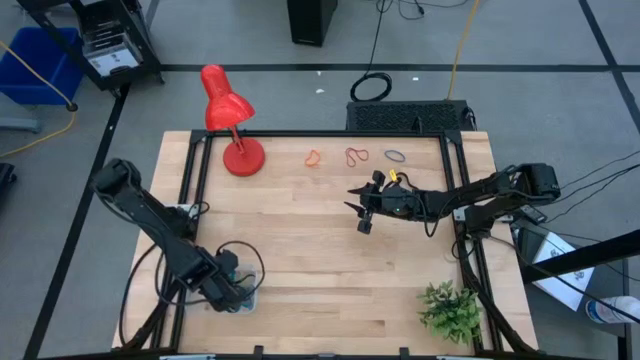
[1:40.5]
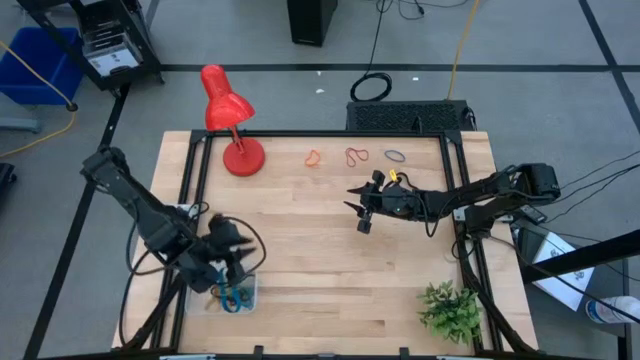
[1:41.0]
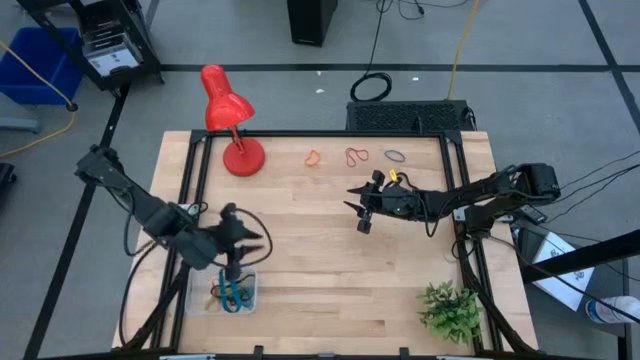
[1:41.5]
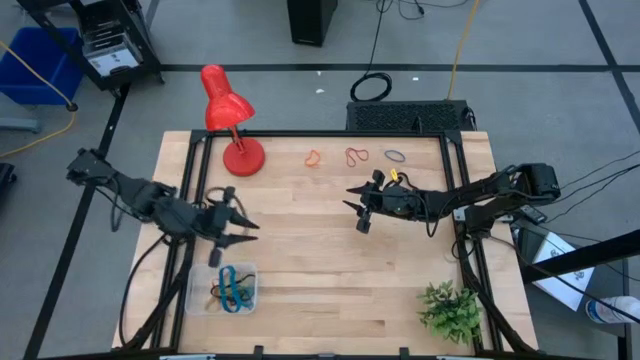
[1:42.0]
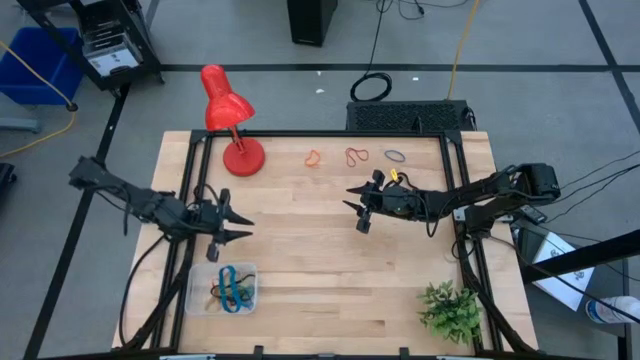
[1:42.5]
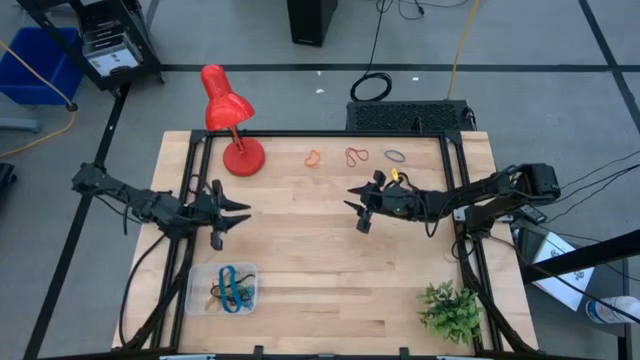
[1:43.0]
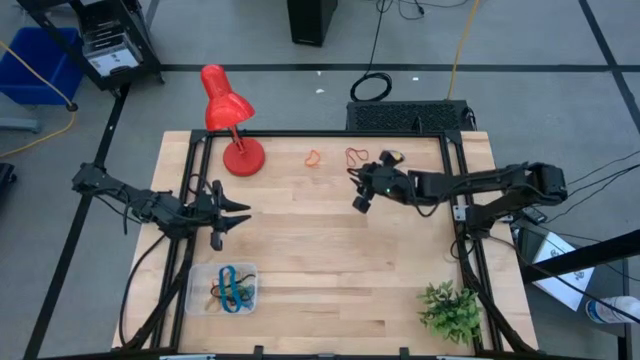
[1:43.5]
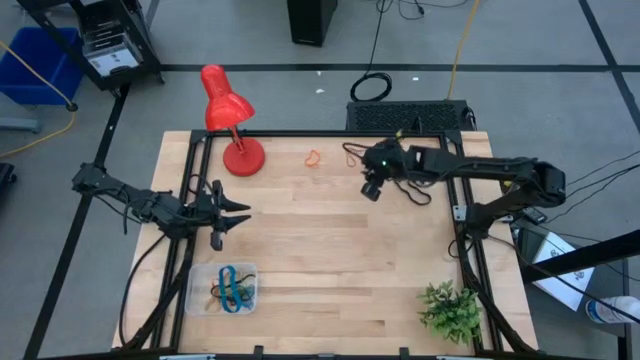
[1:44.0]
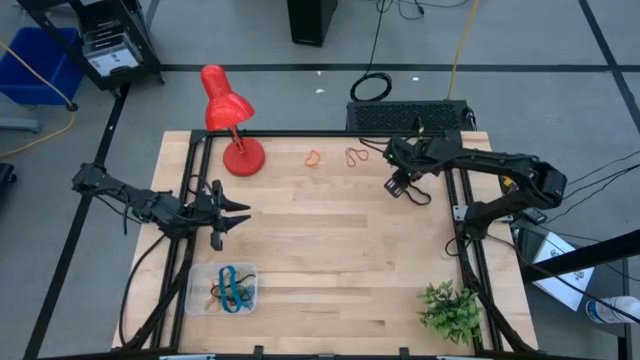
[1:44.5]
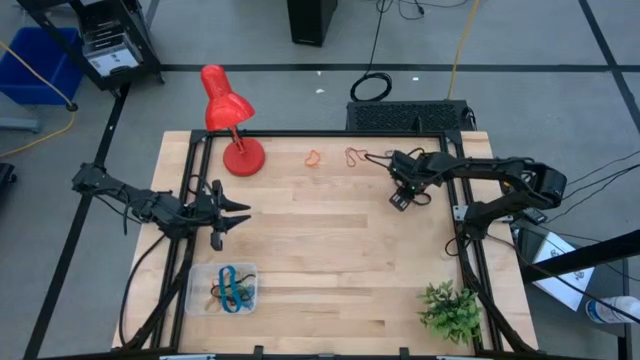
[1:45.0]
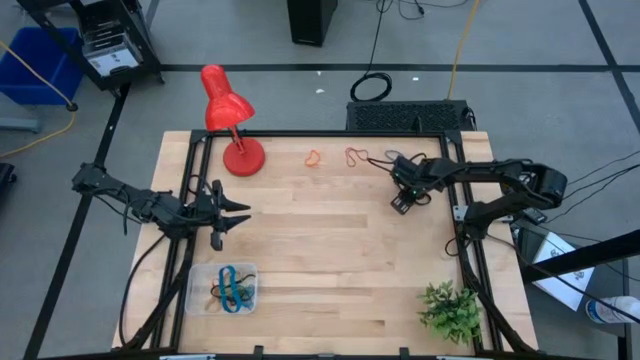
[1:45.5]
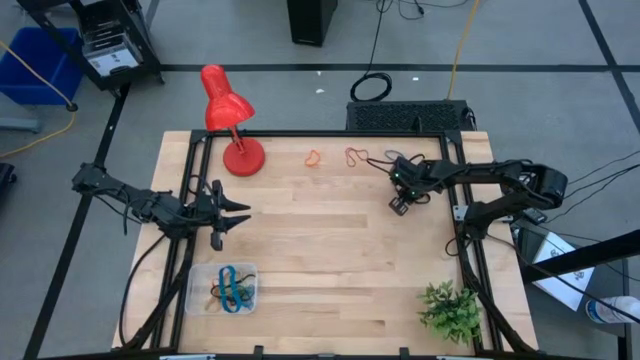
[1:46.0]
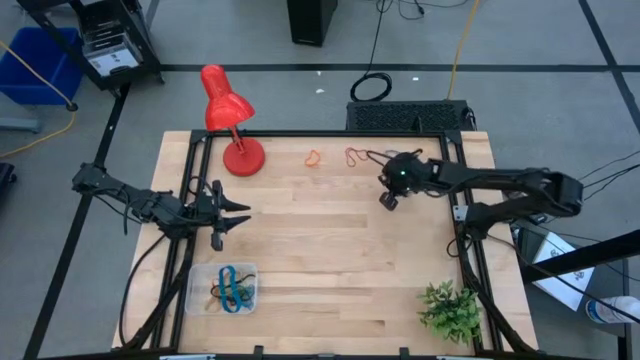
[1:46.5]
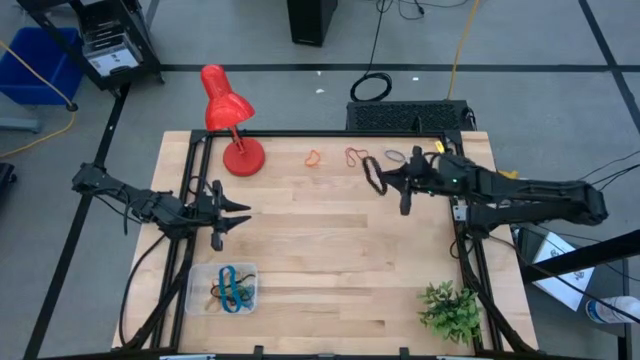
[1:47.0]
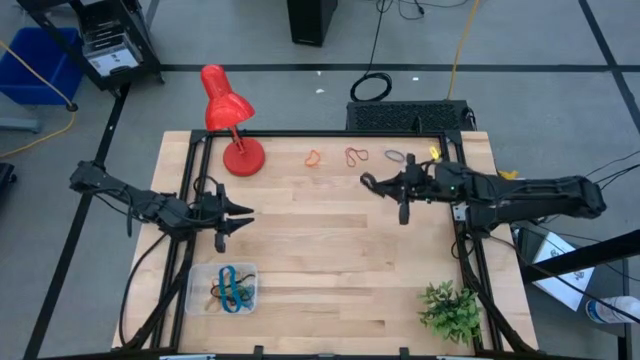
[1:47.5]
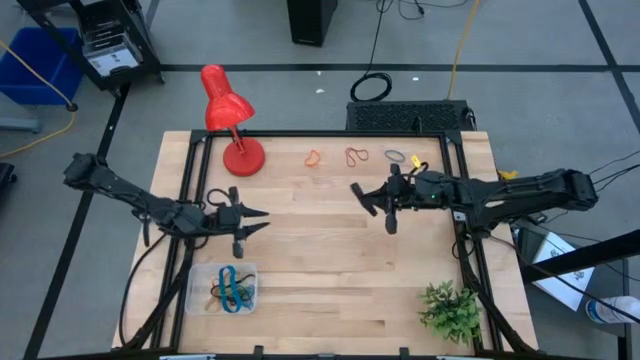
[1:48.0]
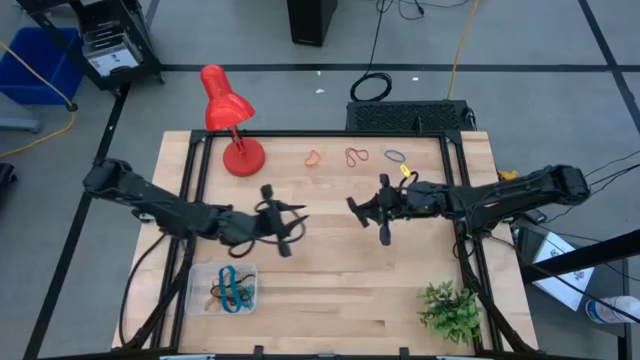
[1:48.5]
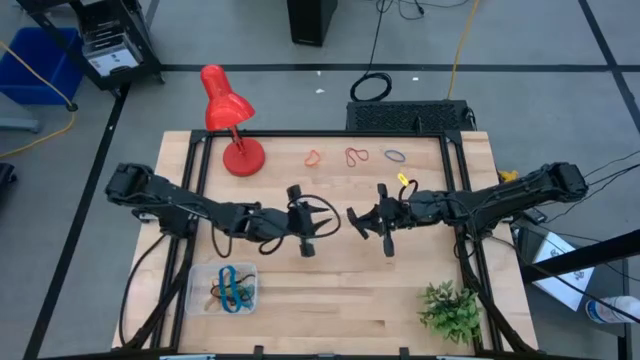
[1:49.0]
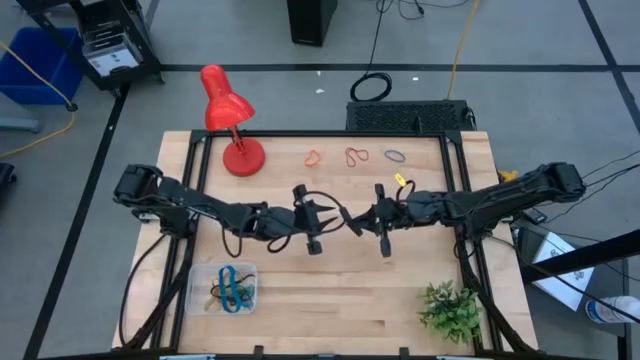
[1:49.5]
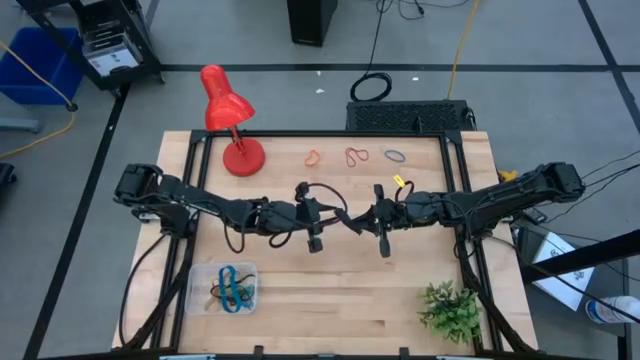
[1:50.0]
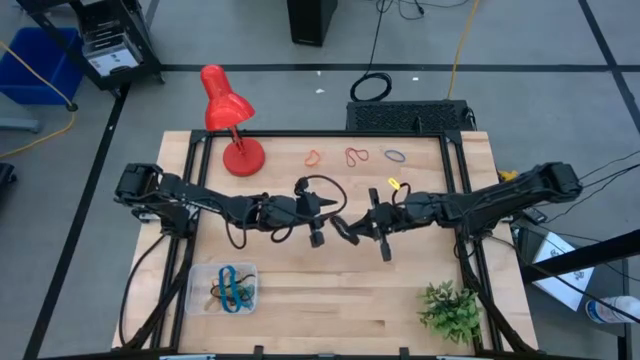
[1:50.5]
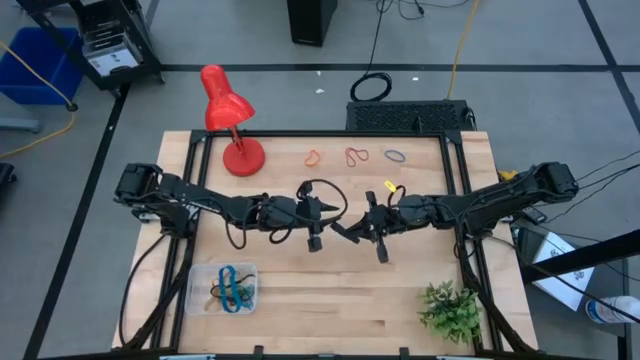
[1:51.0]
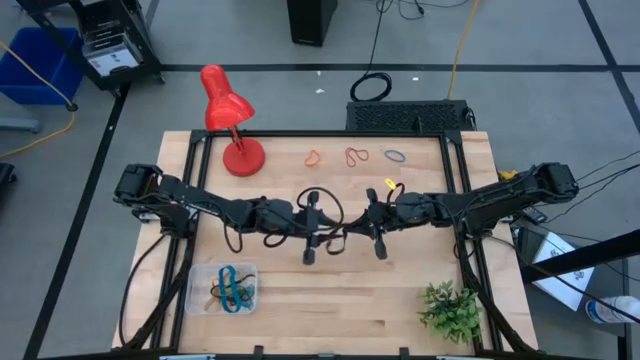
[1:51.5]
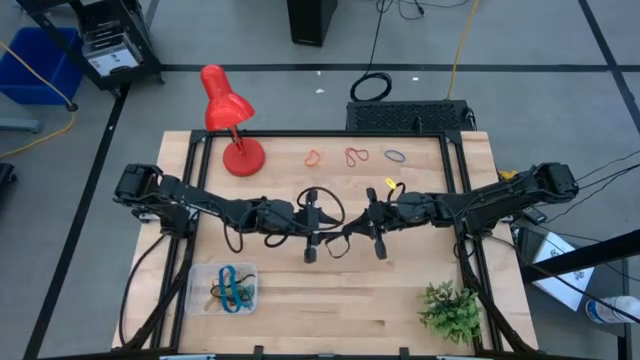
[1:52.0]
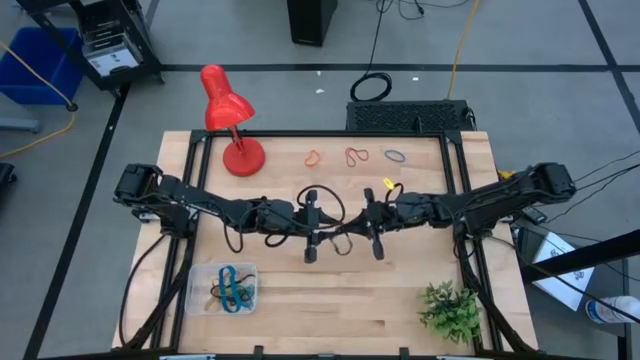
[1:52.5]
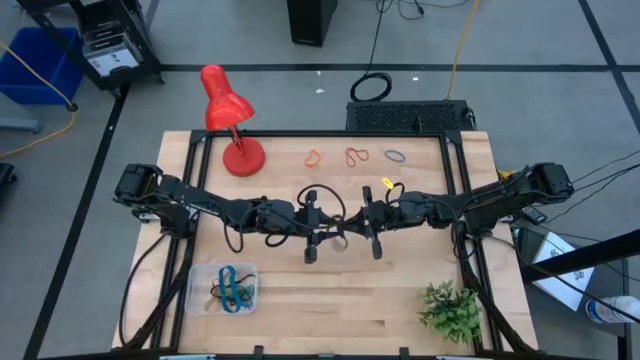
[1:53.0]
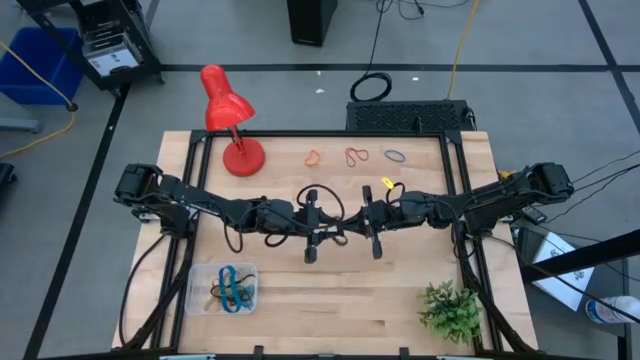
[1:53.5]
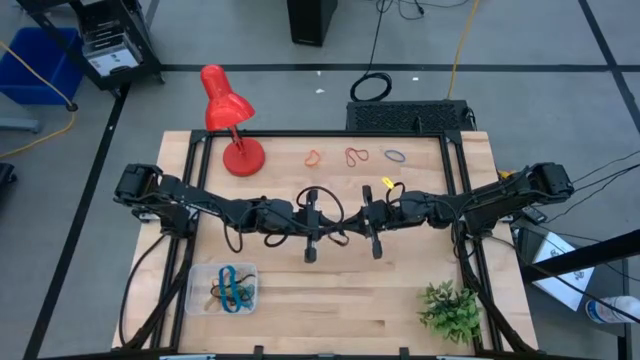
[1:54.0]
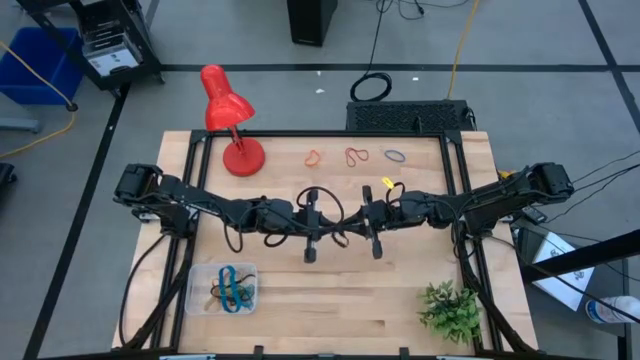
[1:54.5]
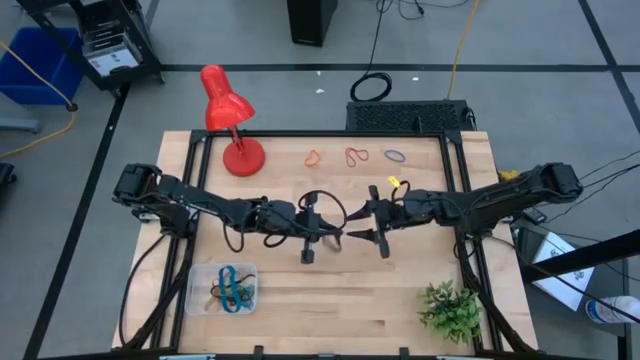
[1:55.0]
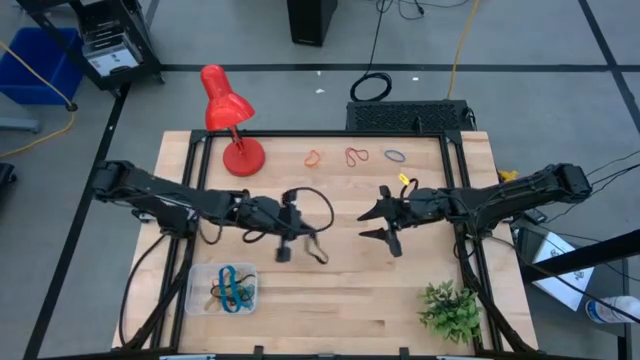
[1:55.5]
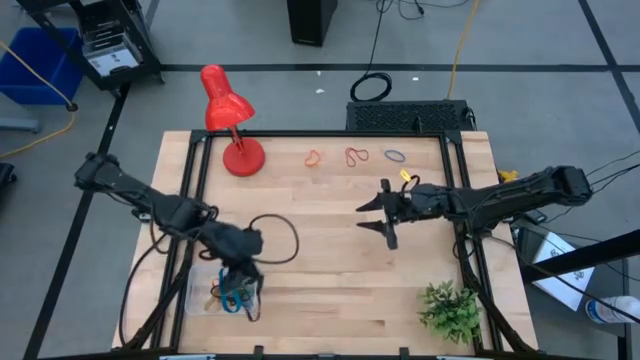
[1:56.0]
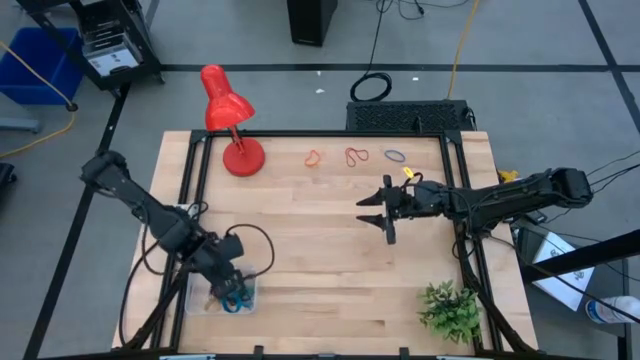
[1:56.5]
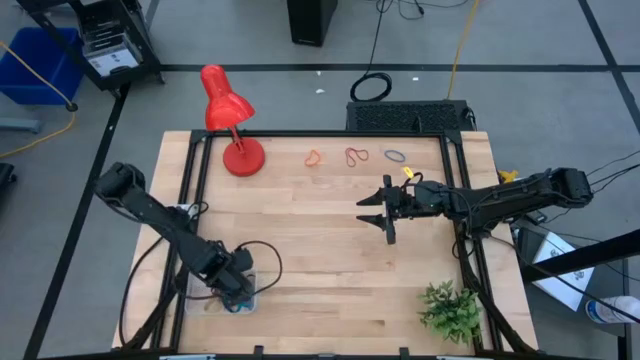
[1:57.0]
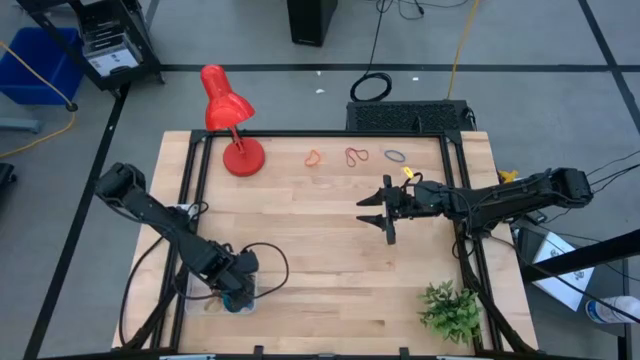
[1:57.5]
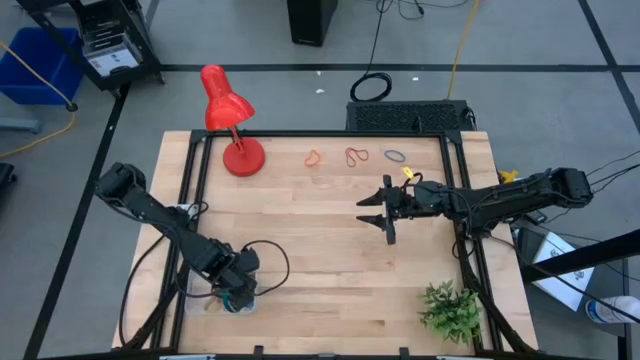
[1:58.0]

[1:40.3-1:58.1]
Task: Pick and place rubber bands into bin
Put the black rubber band into the transparent bin
